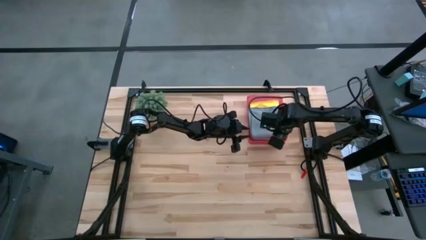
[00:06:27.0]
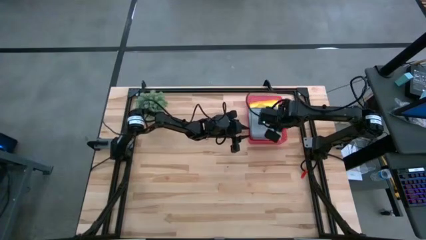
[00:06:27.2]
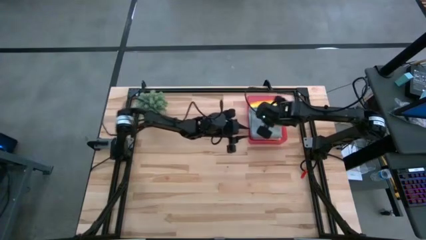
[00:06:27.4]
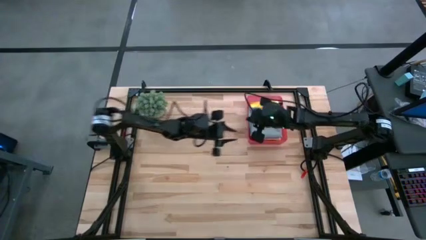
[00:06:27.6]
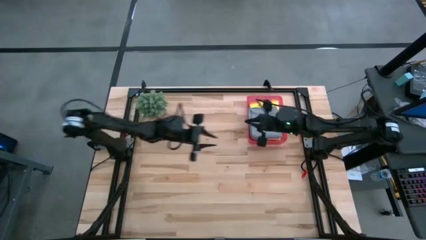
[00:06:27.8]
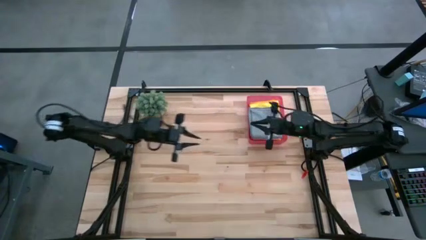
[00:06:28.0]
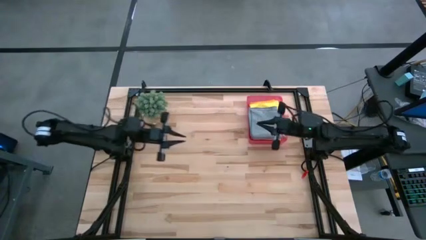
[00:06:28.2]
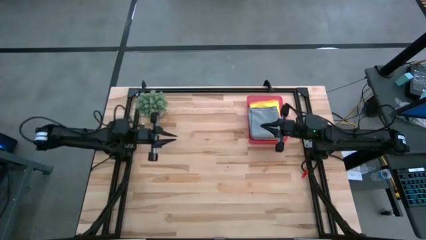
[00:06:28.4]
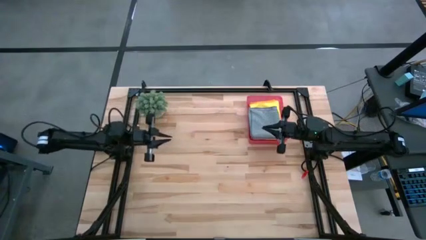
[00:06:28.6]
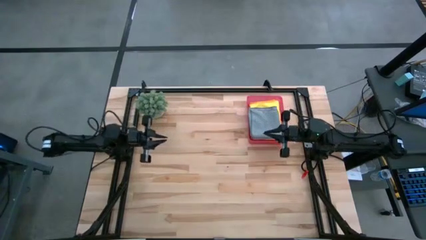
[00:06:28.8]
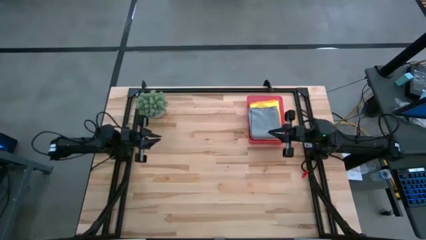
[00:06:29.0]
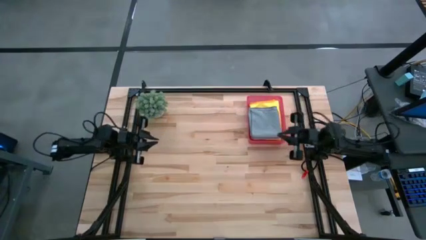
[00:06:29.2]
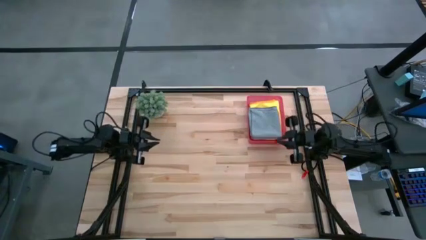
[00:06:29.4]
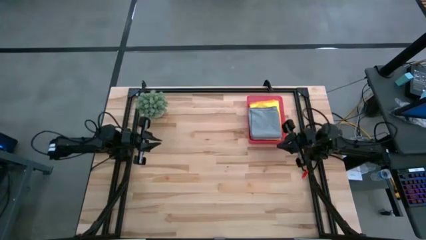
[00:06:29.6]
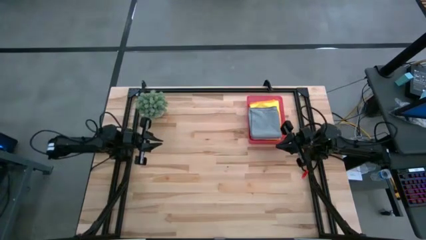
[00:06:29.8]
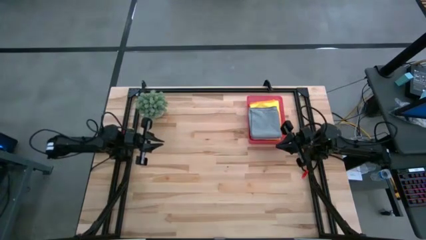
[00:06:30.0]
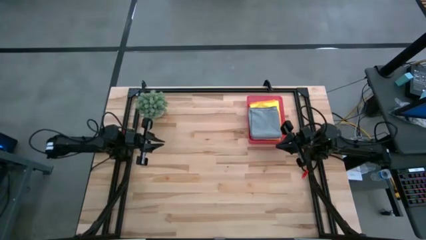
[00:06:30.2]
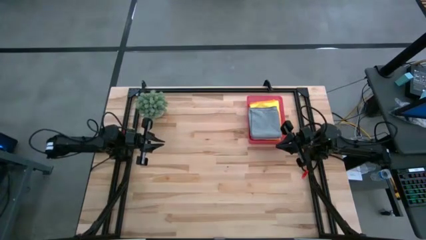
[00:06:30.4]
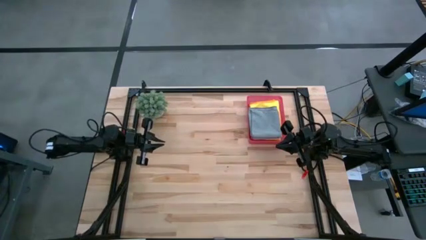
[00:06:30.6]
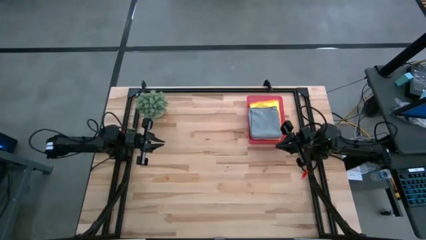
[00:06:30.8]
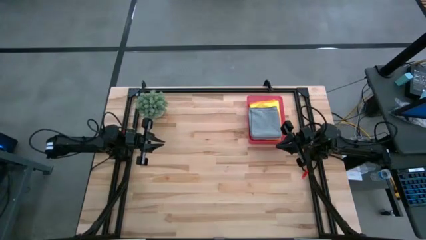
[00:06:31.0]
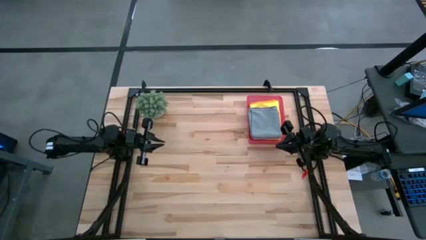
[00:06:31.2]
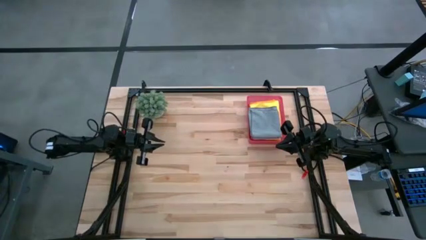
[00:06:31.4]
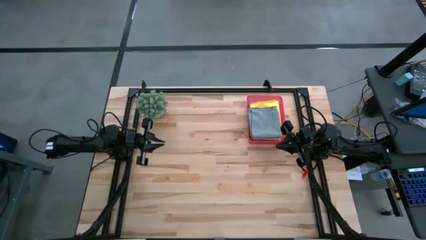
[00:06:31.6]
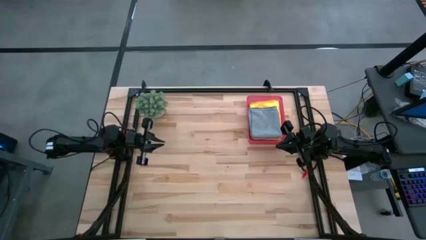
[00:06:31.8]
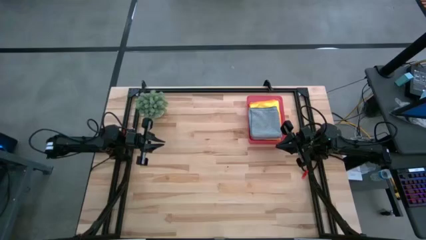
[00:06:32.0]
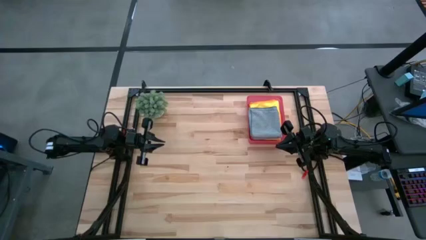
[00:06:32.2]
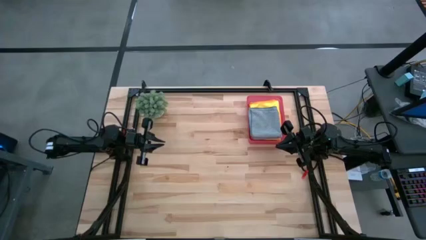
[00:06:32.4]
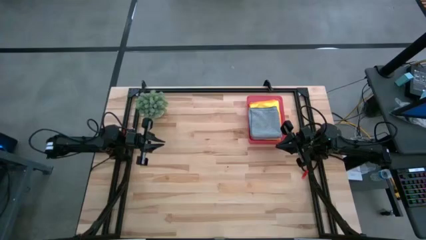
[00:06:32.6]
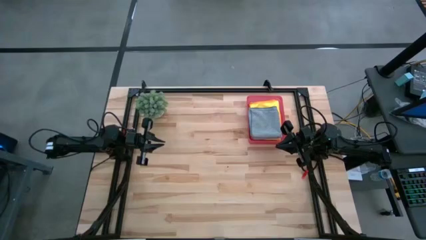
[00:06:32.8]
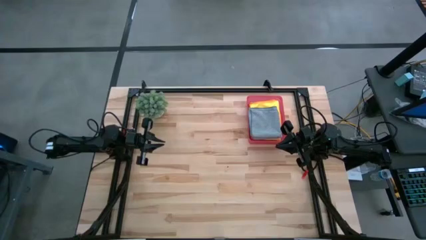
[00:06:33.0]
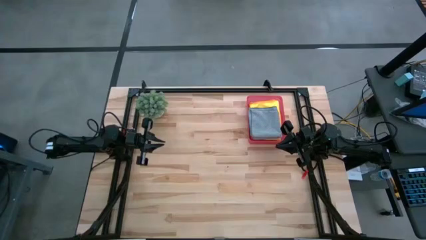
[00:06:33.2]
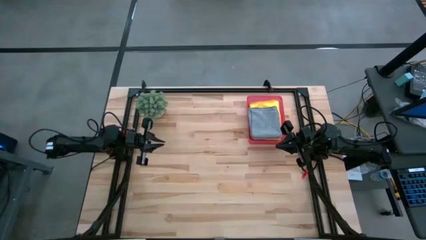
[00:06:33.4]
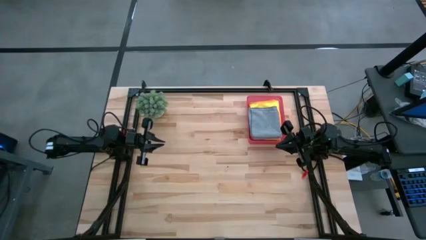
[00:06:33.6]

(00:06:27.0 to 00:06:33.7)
Task: Fold microfiber towels
Return to Home Position

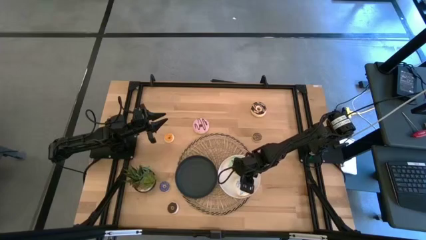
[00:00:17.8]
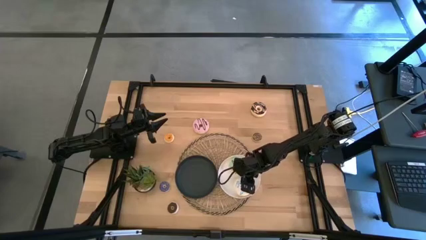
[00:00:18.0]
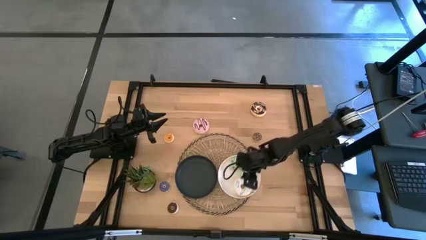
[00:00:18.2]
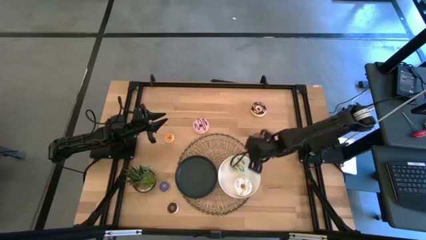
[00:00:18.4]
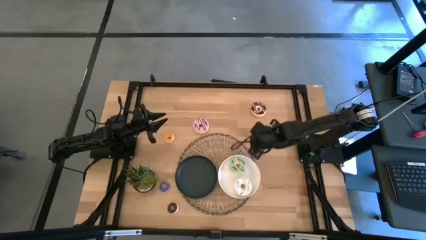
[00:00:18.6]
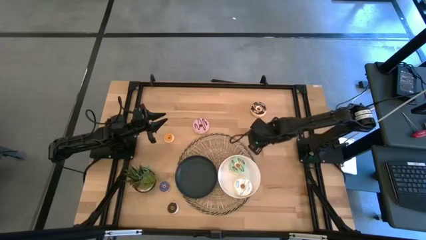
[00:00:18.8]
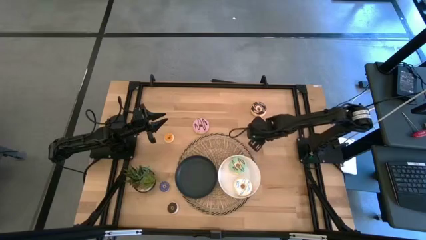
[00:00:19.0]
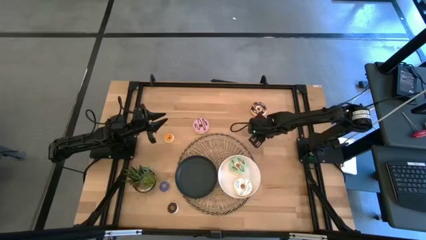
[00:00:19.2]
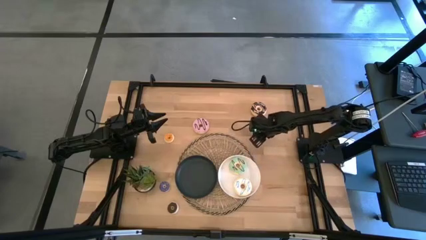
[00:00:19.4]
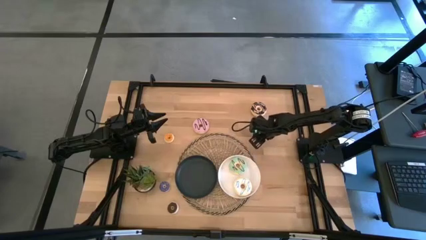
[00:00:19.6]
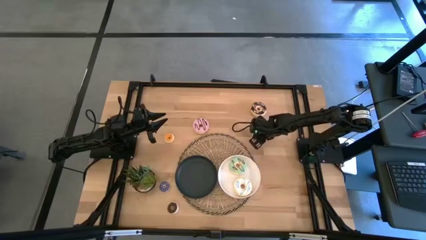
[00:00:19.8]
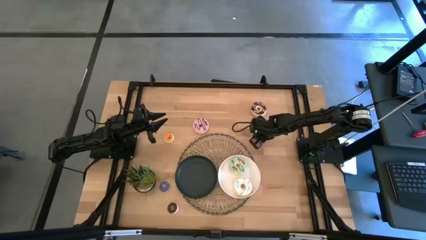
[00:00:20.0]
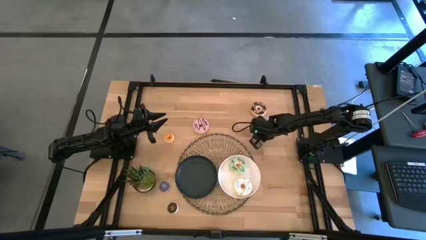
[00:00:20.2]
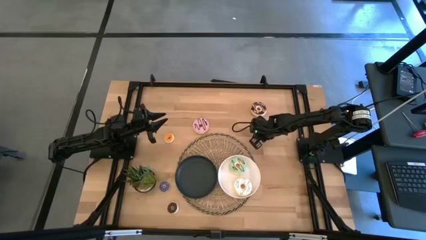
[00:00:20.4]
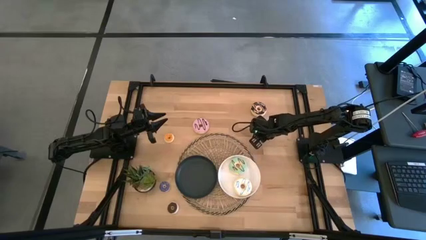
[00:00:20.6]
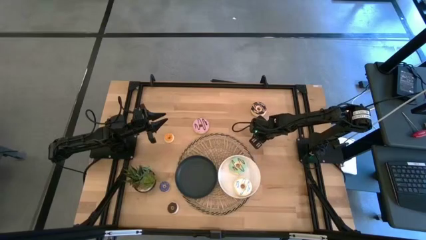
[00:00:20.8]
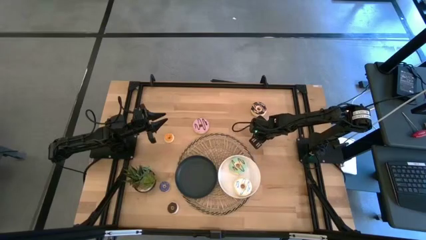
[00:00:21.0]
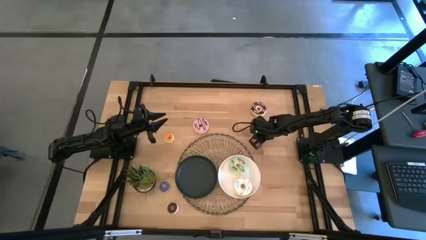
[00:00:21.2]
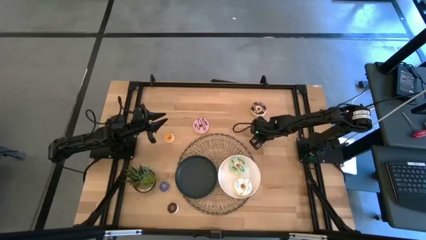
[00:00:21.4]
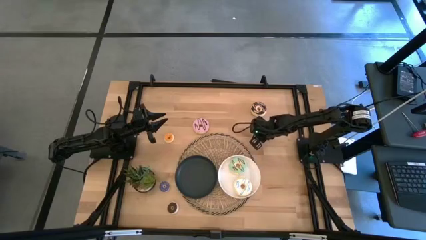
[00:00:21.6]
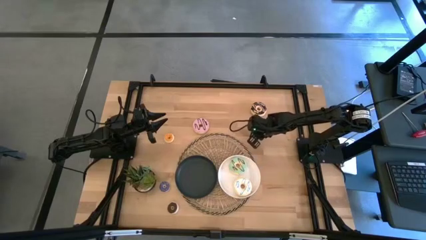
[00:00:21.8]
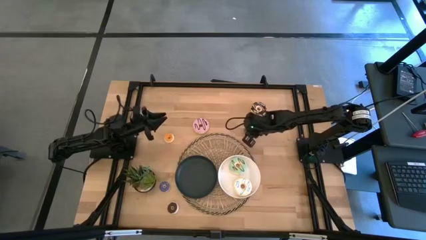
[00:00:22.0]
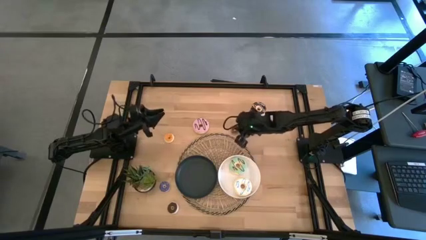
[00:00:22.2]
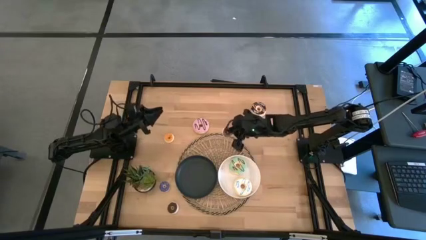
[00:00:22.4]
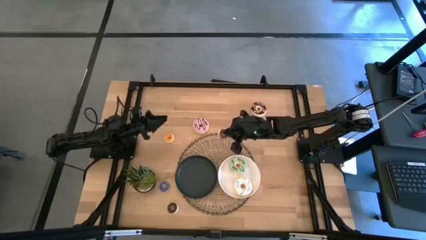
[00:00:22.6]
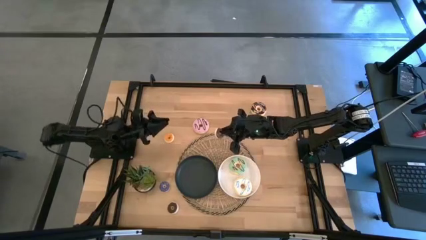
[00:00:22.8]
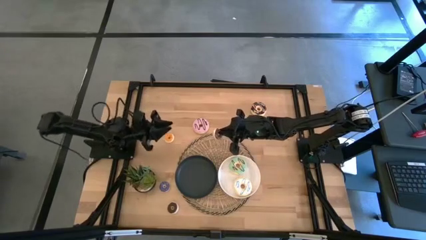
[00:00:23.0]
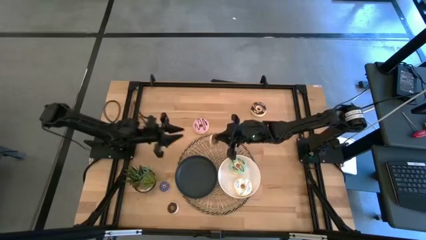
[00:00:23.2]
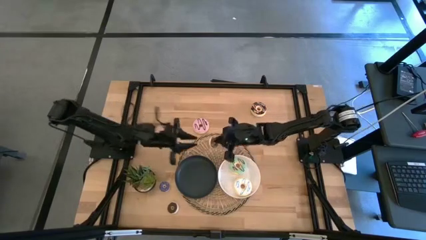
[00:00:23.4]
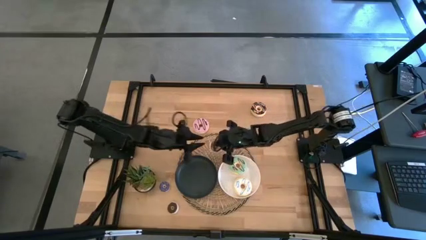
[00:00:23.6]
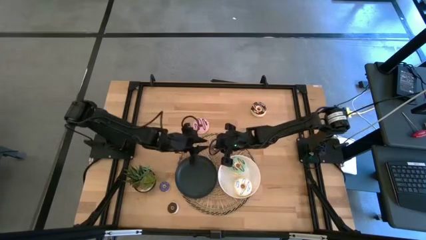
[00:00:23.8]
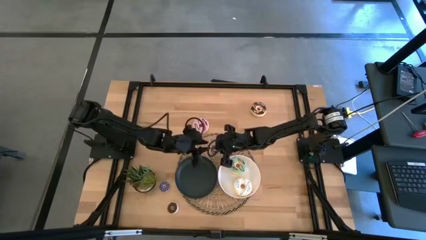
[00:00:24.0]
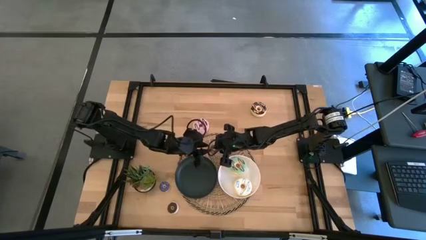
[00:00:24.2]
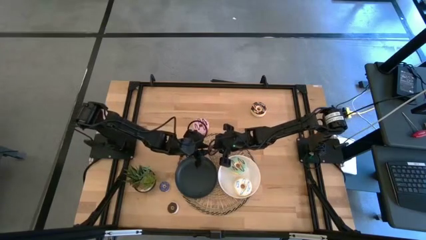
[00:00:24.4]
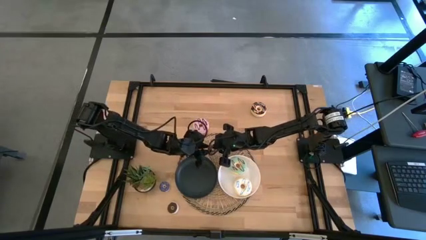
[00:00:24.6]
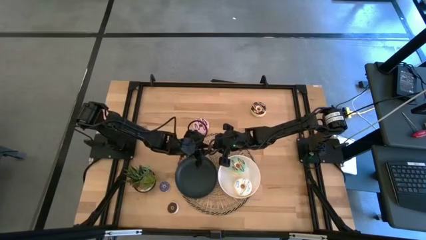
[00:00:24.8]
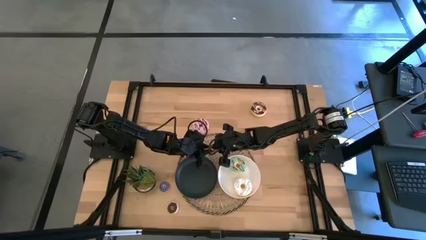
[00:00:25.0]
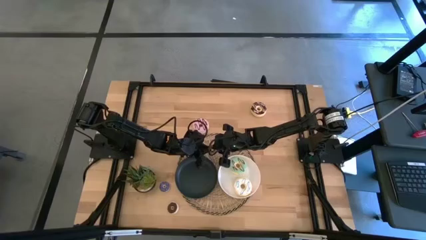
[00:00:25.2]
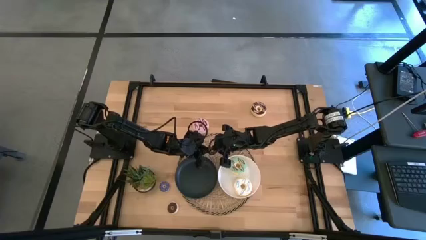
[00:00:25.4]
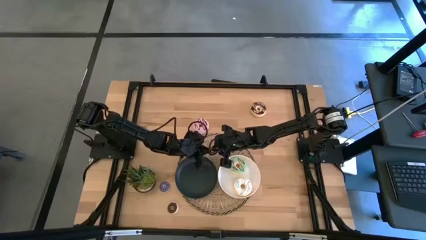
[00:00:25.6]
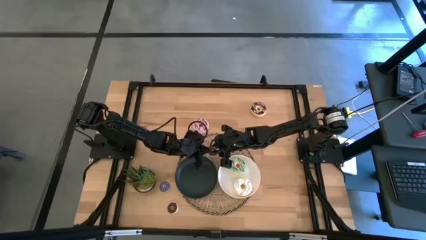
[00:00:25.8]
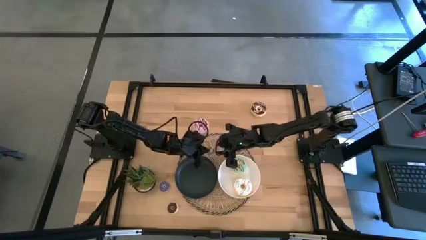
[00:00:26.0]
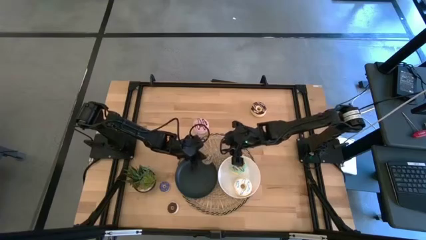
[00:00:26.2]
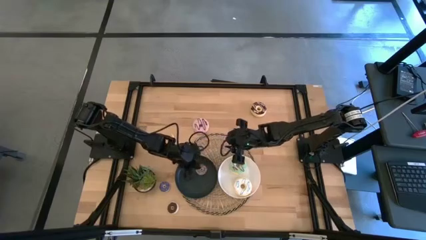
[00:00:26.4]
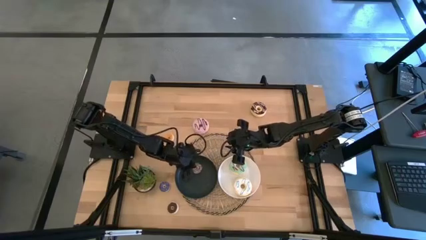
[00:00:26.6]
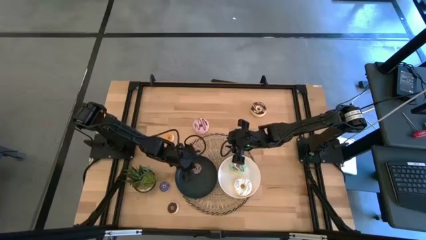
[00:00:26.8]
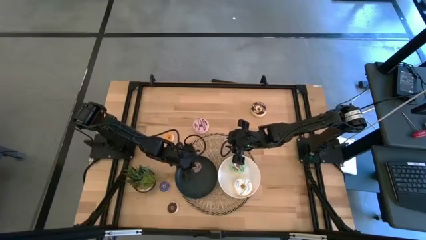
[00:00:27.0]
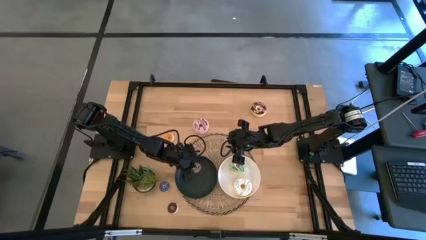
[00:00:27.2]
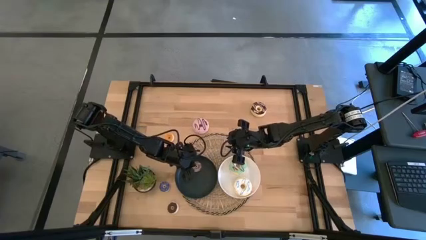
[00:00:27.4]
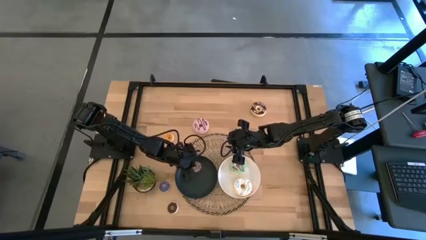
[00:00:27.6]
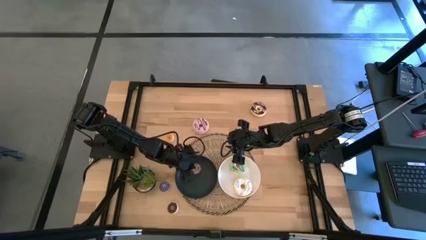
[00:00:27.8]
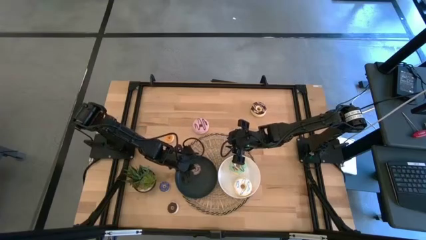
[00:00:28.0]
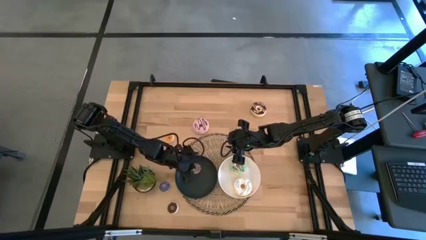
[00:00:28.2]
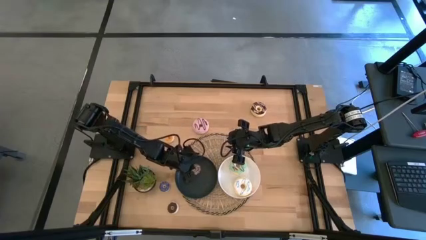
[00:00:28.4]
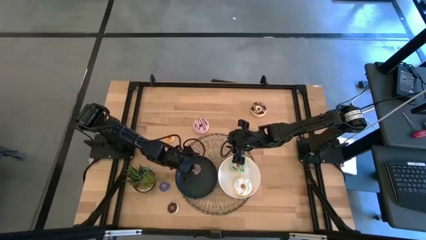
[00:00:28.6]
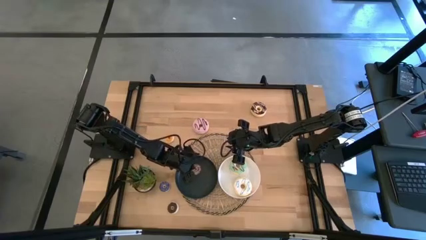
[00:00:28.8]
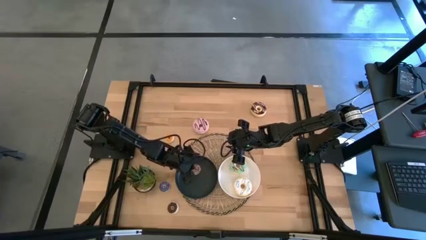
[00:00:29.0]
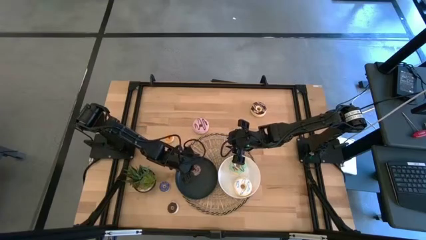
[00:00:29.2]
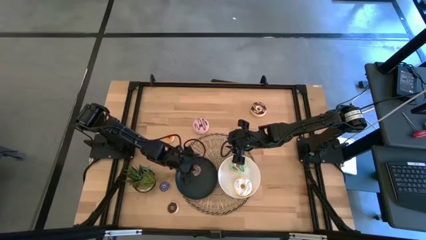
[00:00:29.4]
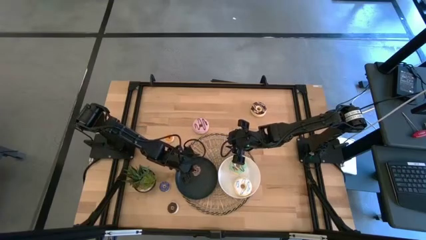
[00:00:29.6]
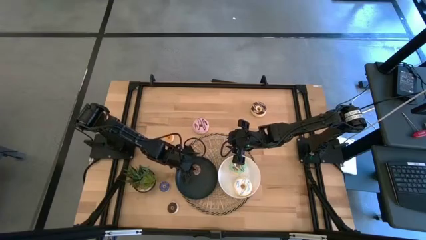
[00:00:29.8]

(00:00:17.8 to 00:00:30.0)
Task: Pick & Place donuts
Put the small brown donut on the black plate
